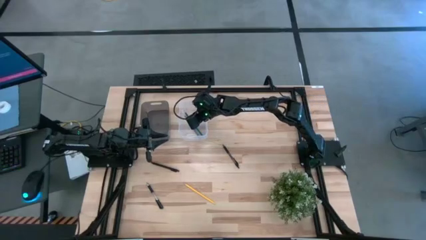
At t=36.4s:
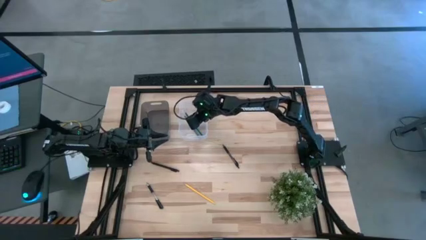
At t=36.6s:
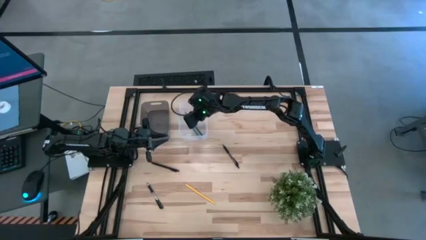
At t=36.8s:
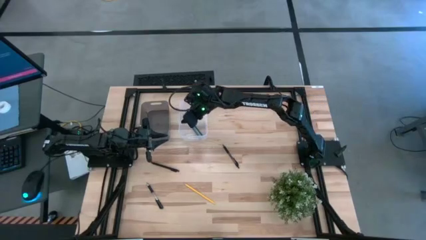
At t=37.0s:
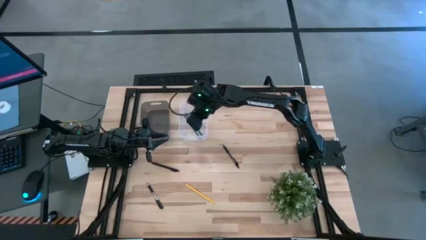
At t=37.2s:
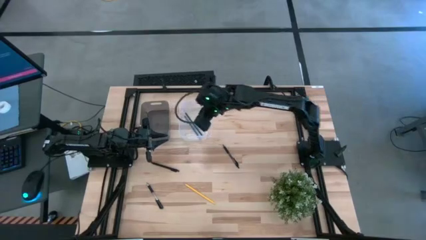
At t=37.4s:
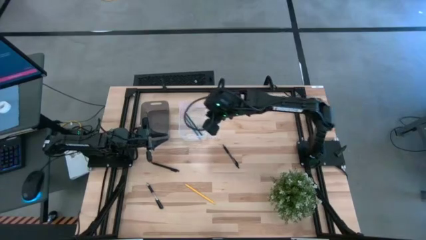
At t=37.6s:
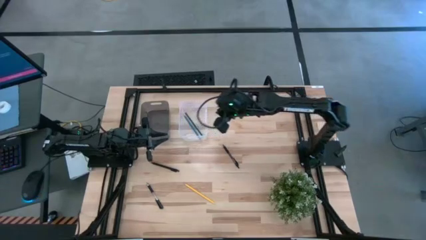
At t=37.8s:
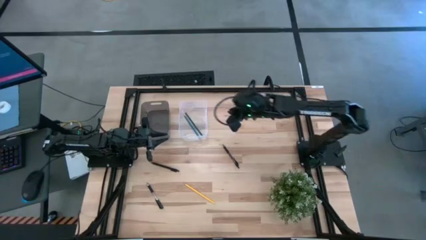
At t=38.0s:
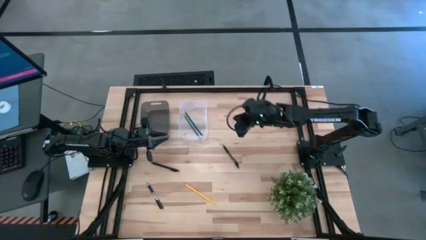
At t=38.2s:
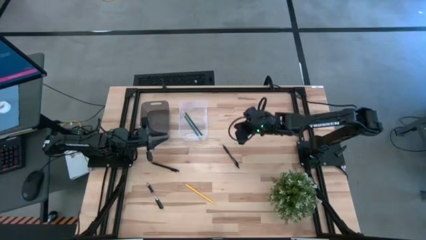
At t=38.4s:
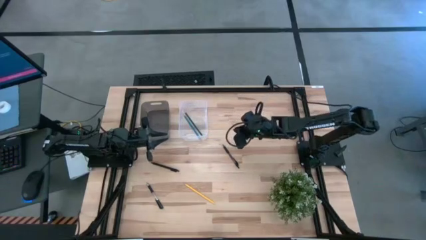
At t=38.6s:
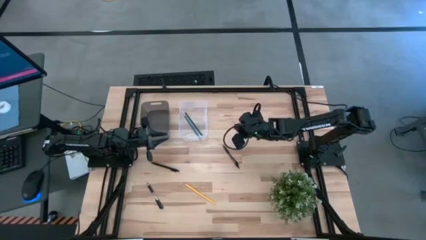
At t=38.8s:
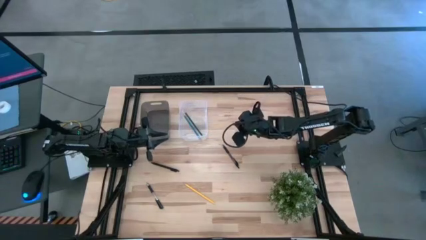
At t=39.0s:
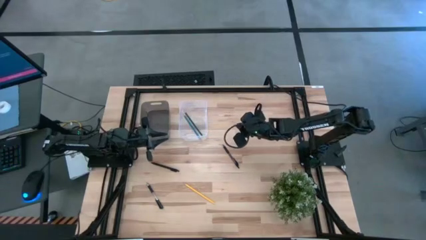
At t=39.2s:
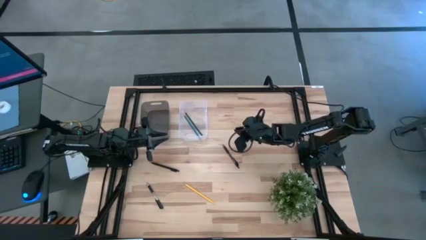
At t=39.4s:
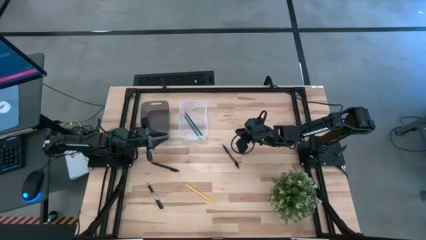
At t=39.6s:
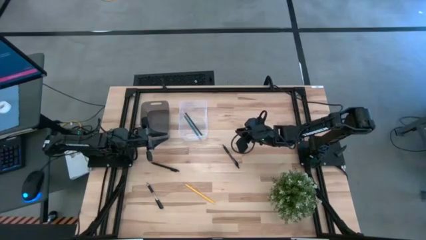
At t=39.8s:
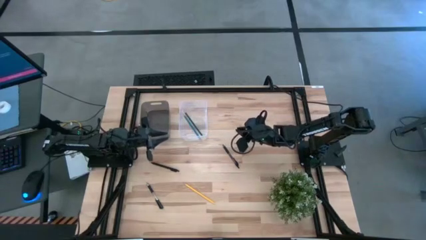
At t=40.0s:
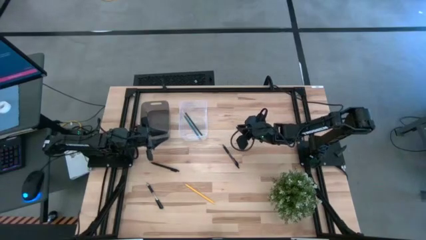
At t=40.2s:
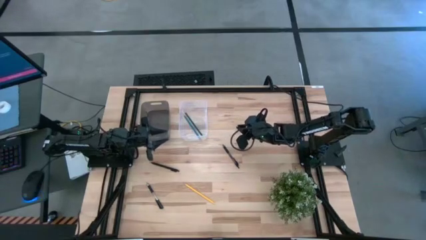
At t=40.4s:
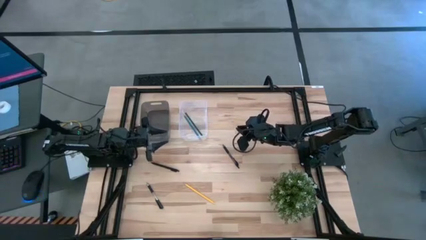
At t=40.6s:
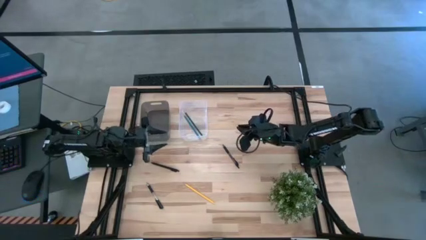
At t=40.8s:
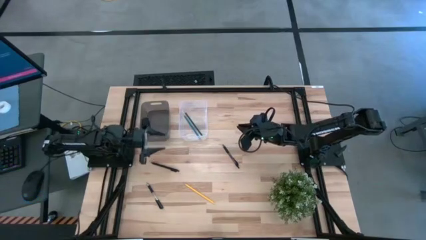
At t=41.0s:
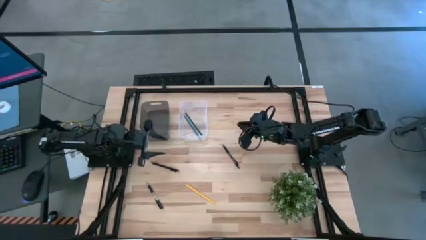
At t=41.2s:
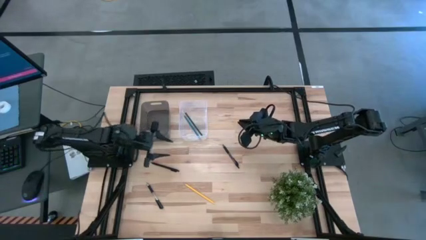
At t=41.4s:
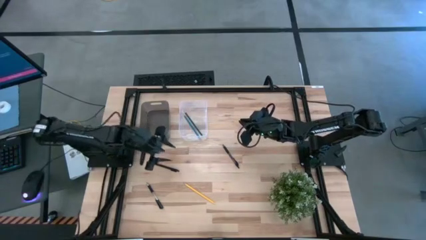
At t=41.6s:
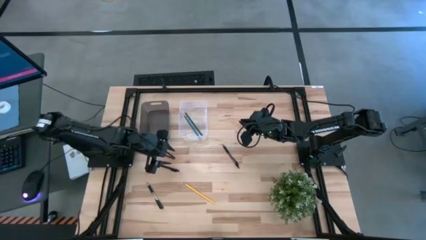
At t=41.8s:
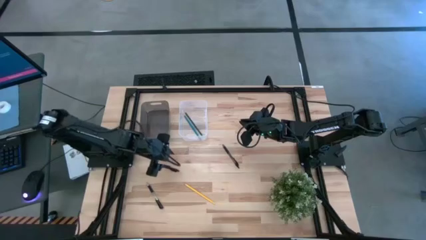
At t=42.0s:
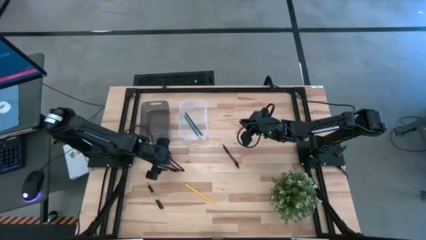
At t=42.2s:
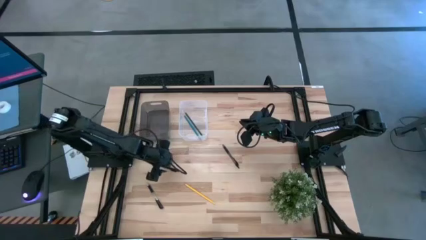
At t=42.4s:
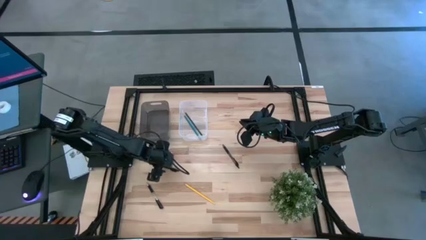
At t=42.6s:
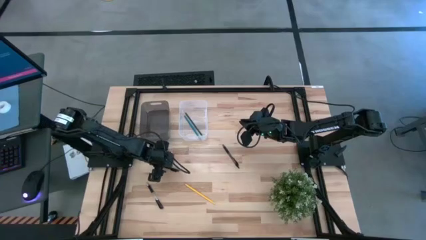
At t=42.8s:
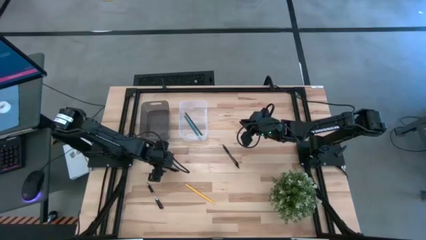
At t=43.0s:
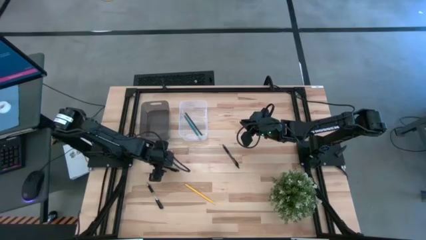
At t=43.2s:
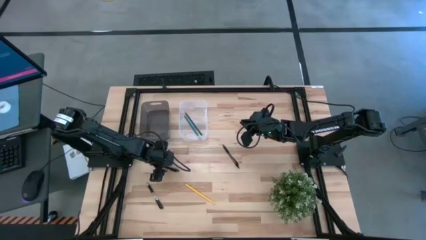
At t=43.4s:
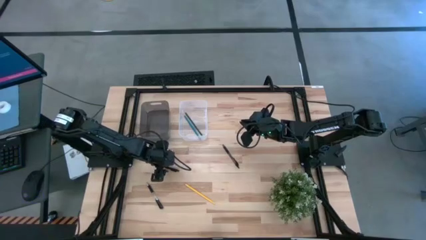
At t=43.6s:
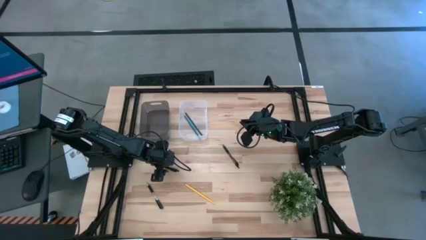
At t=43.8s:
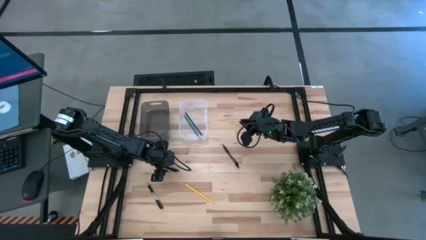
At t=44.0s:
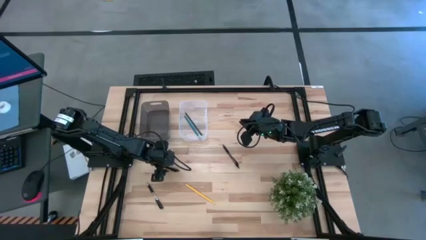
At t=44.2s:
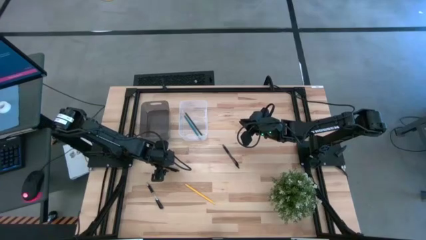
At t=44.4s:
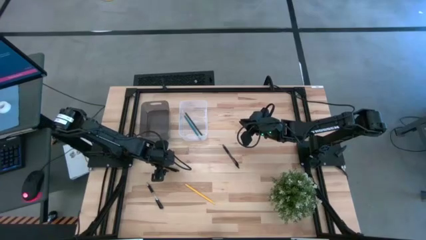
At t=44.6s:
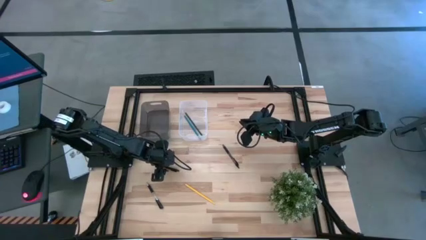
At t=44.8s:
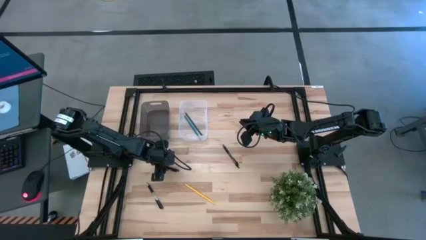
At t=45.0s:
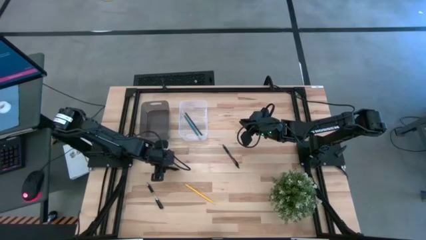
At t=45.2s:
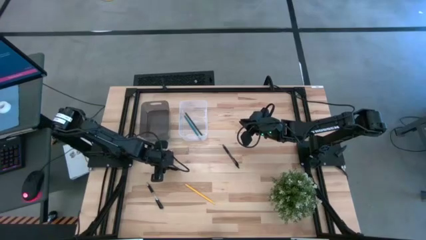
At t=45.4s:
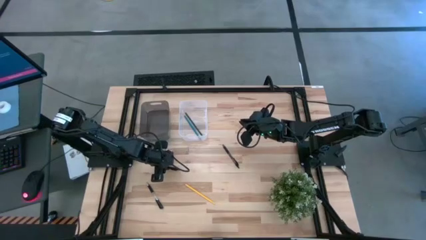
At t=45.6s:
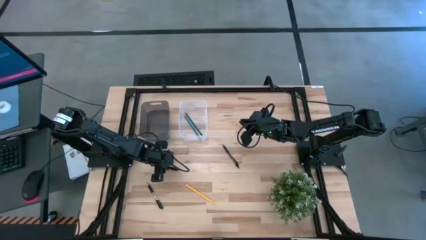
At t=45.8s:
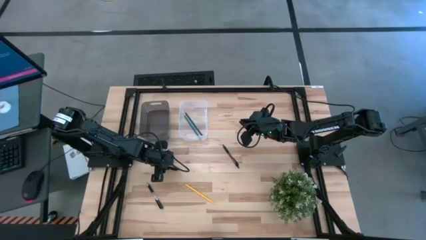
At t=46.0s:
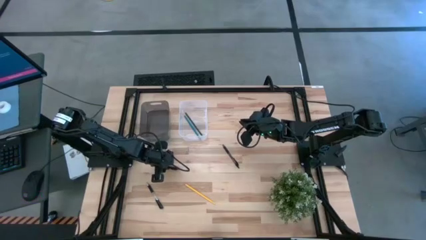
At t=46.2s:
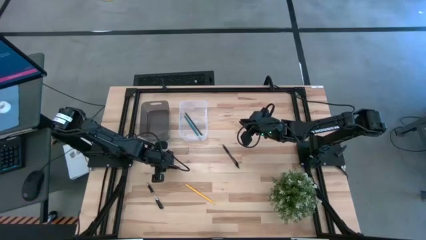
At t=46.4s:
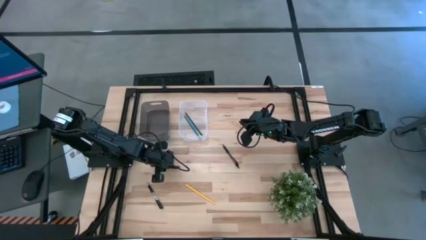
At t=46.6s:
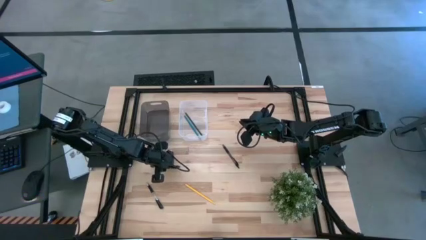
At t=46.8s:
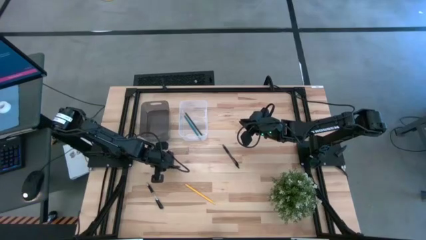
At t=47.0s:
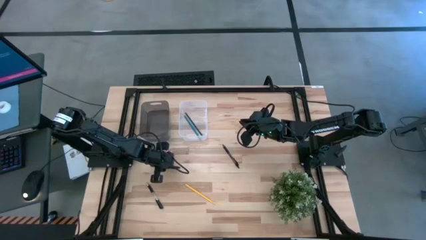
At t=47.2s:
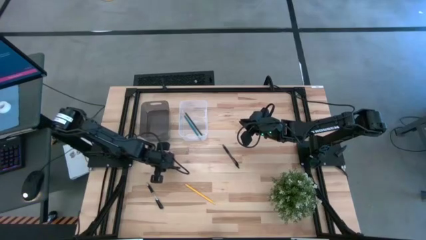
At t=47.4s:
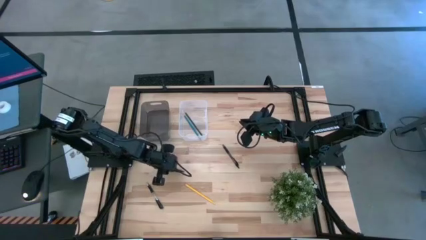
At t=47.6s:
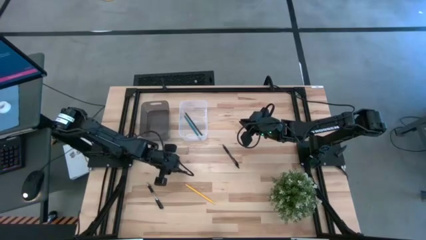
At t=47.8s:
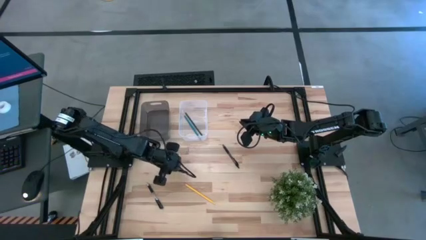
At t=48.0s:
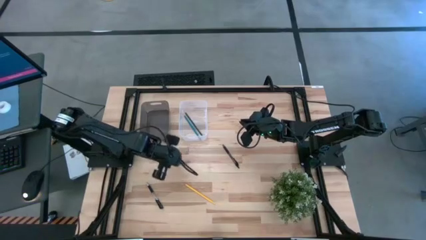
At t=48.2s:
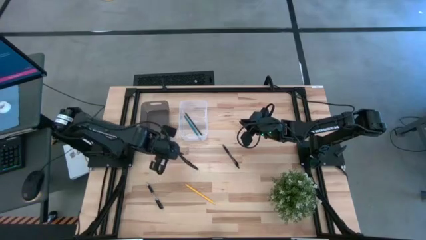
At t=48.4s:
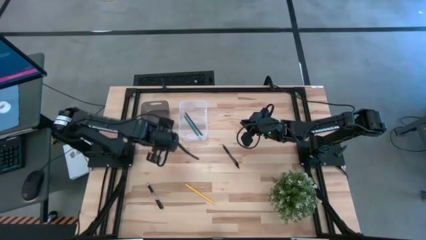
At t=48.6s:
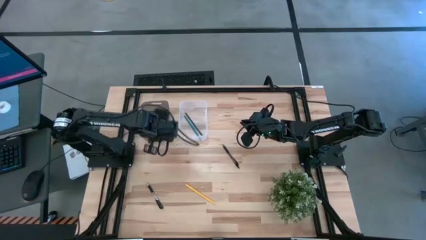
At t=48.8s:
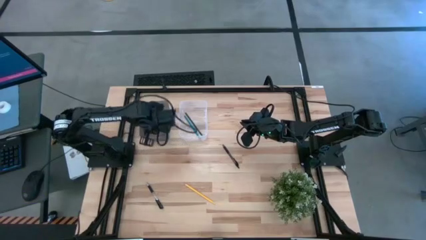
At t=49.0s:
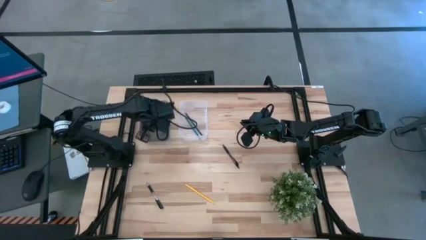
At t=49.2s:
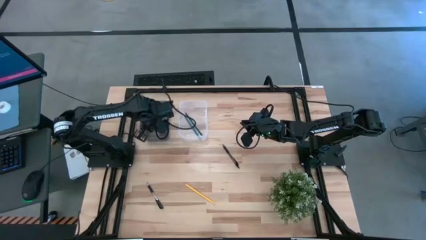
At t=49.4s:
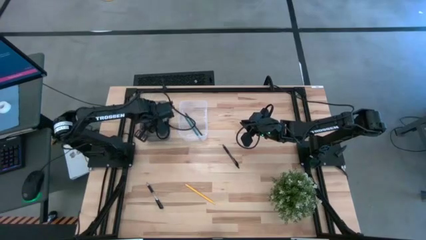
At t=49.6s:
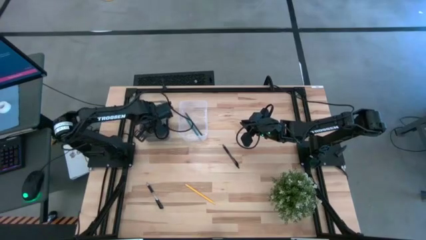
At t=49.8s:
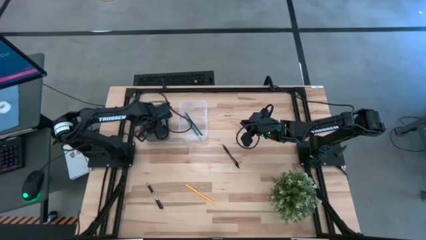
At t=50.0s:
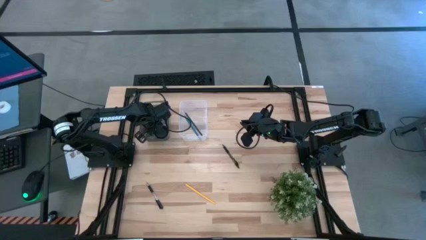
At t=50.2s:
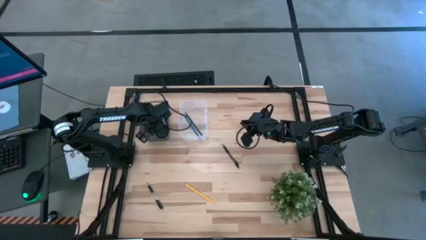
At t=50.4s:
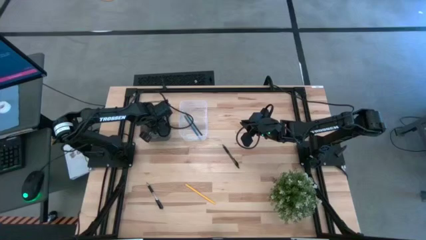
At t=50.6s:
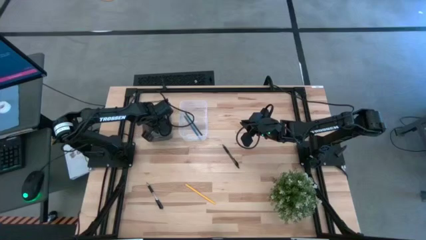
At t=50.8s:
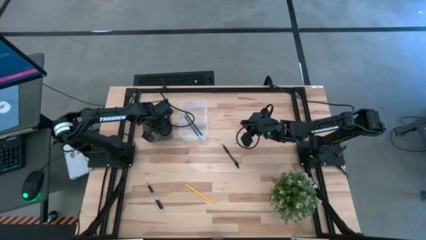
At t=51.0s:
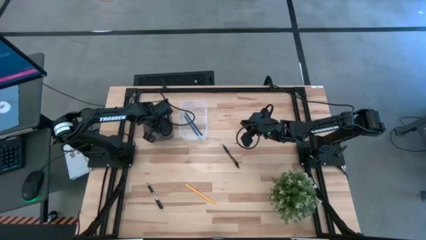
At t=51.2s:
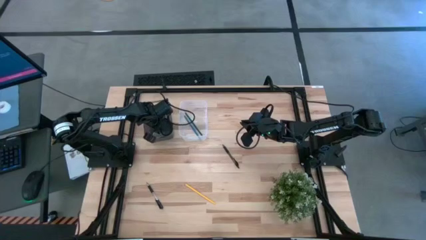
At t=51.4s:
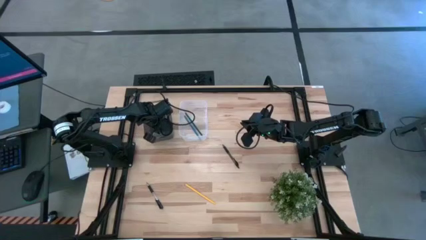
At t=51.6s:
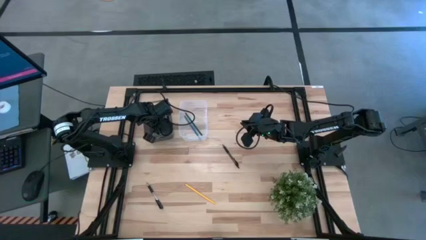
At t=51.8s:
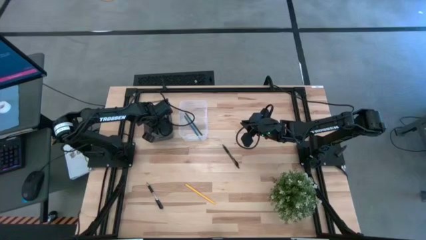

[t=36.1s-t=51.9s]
Task: Sort pens & pencils
Put the top left black pen into the black bin

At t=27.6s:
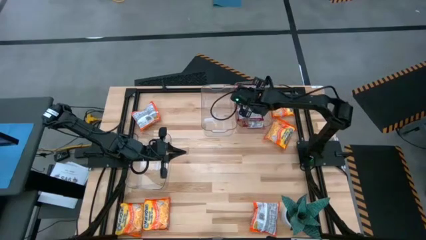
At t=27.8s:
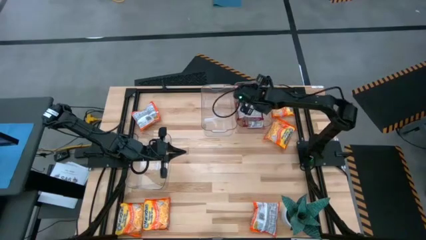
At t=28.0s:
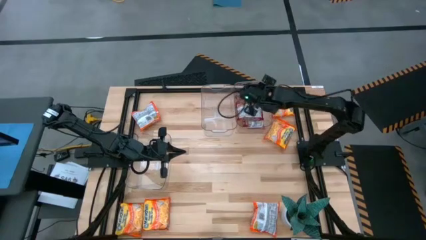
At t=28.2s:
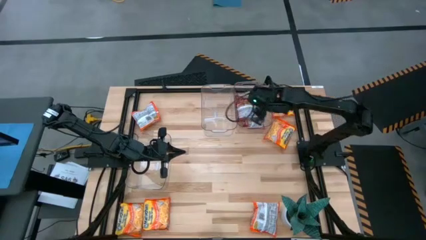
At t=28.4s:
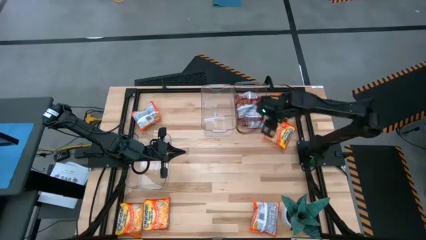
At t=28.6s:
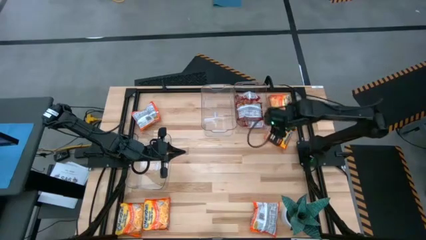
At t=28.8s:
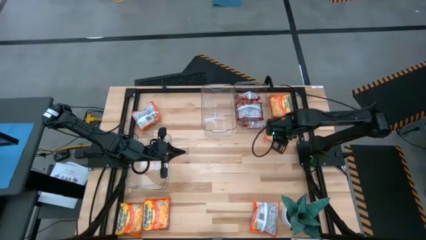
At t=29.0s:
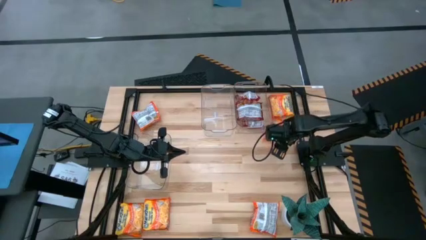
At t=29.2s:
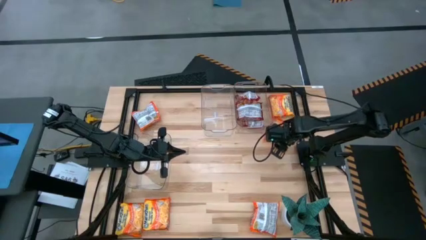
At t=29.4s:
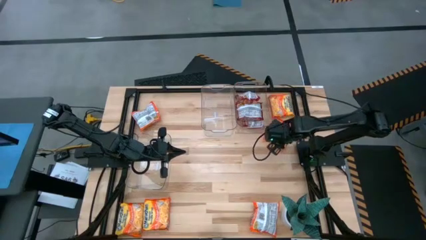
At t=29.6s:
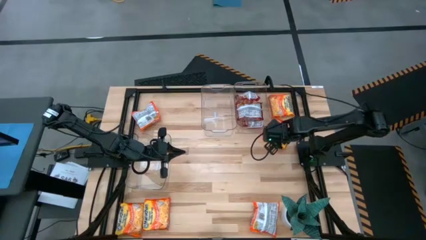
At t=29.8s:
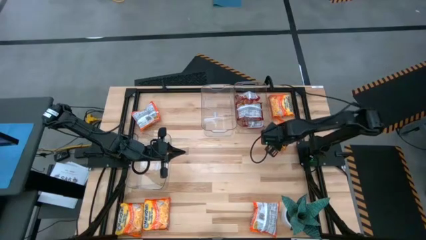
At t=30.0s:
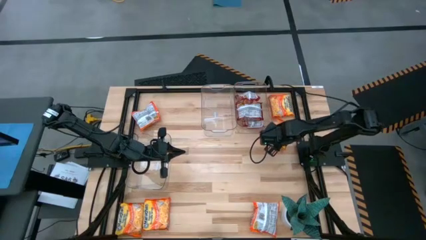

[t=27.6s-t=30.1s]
Task: Sort Maruchan noodles
Put the orange noodle pack into the top left transparent bin
